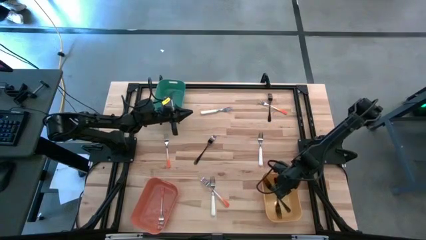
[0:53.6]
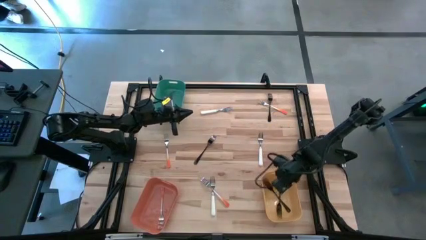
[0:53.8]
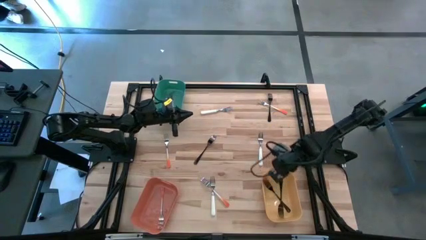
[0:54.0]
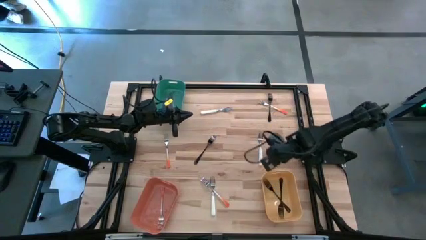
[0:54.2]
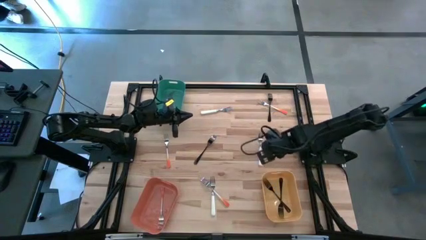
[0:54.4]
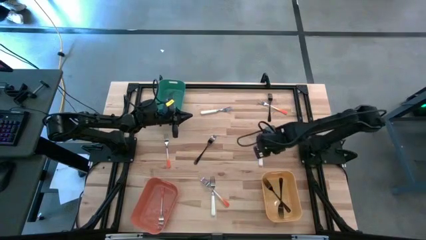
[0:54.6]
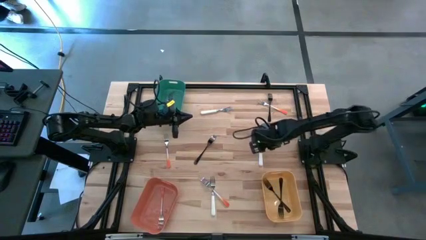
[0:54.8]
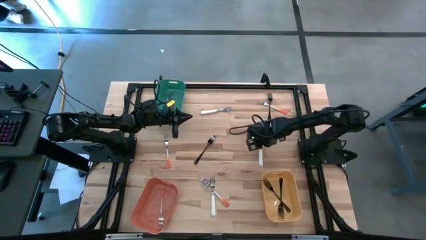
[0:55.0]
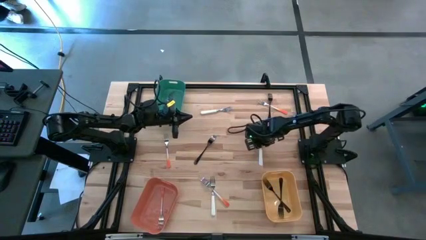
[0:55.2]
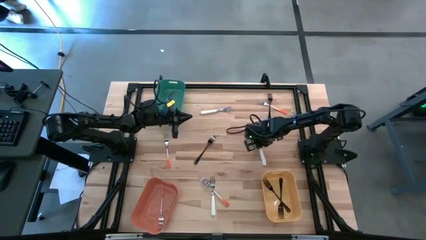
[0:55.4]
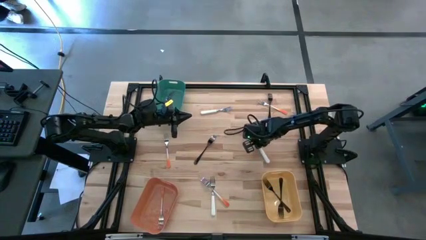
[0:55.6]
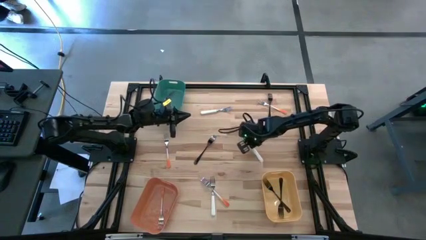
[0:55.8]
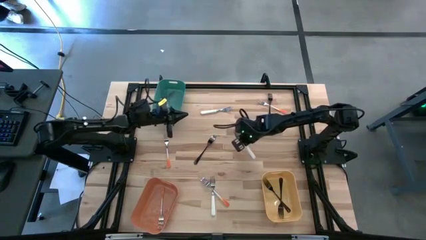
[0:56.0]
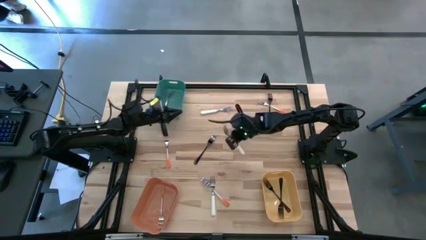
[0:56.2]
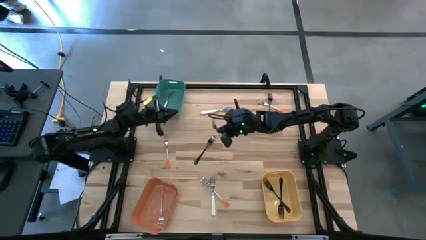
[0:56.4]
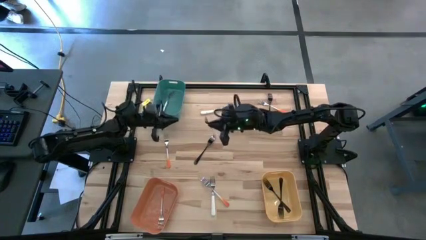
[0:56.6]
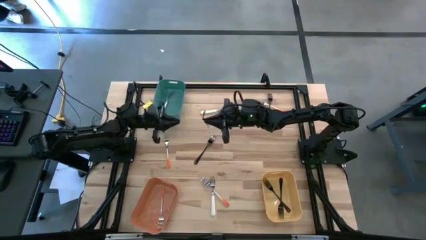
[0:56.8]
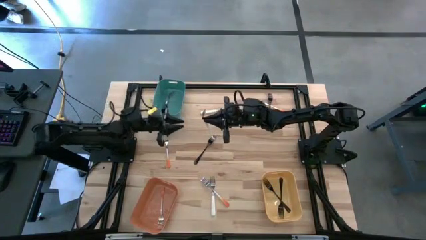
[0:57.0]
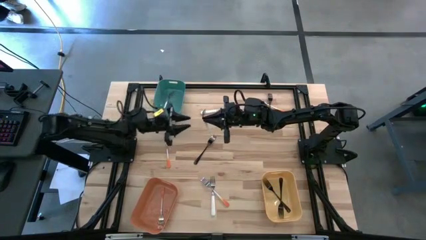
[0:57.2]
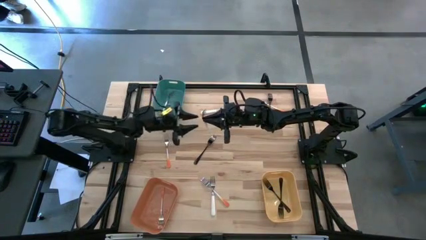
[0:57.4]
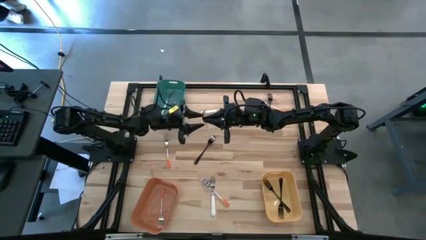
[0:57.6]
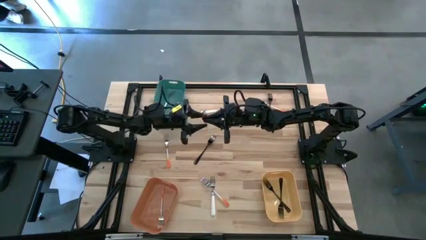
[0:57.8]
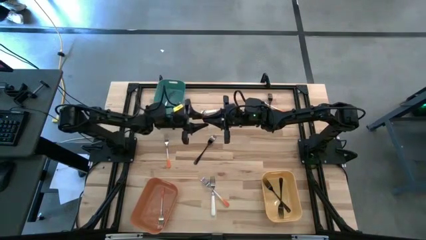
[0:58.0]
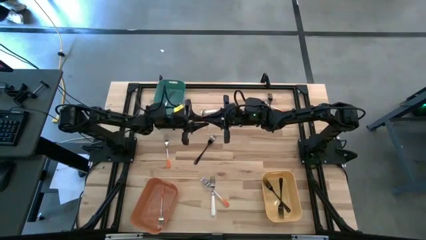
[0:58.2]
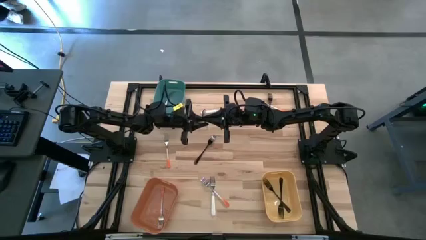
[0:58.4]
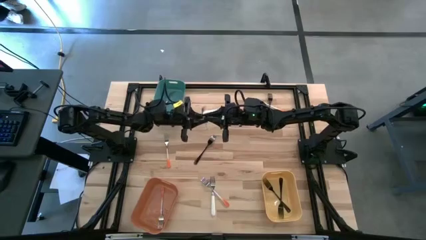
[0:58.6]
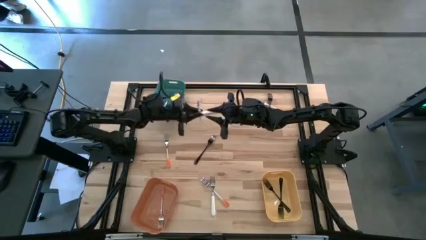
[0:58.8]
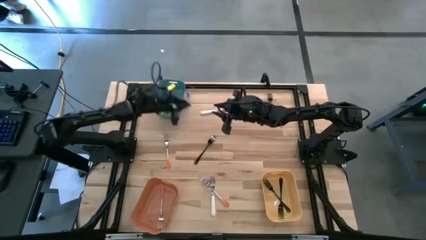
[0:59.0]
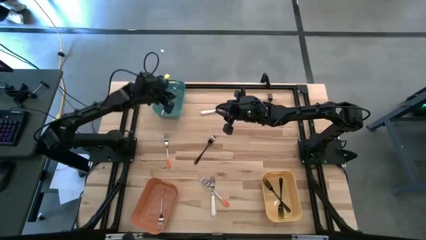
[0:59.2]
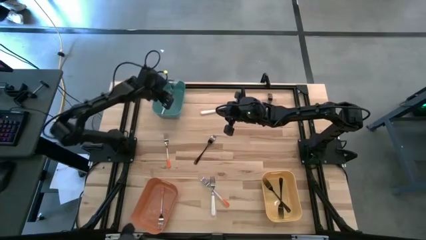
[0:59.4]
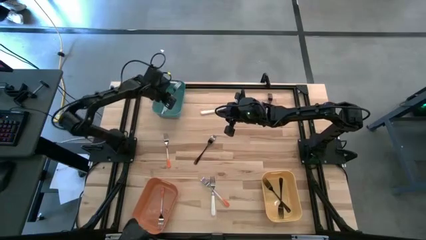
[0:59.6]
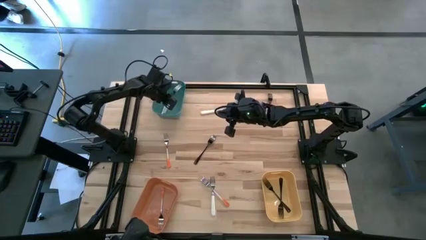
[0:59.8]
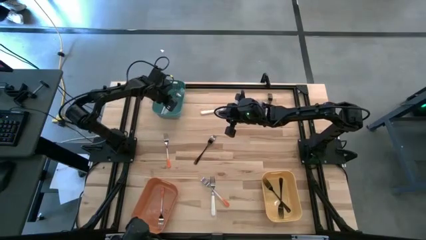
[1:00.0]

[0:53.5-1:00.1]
Task: Sort silverware by color (type)
Put the white fork into the green bin

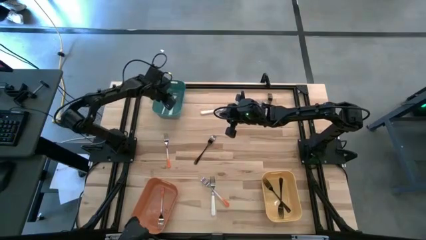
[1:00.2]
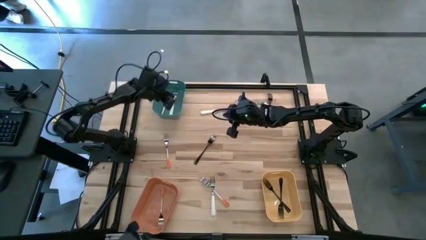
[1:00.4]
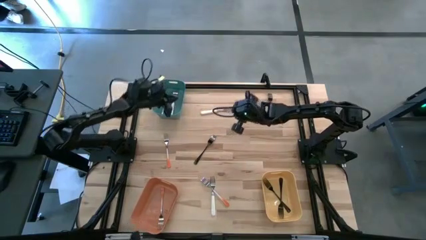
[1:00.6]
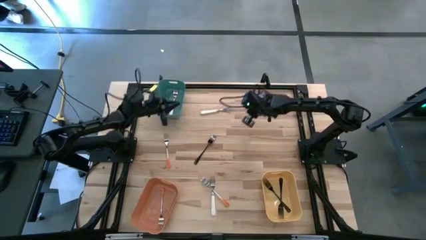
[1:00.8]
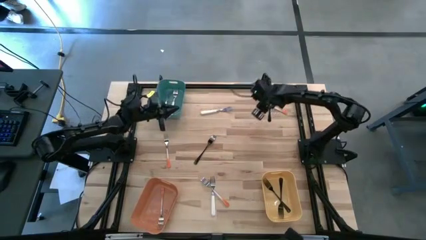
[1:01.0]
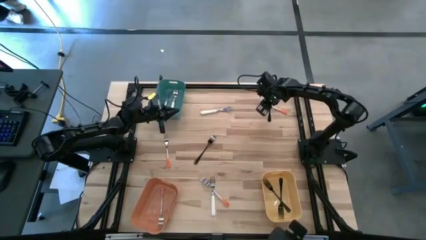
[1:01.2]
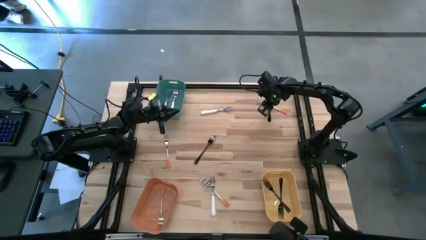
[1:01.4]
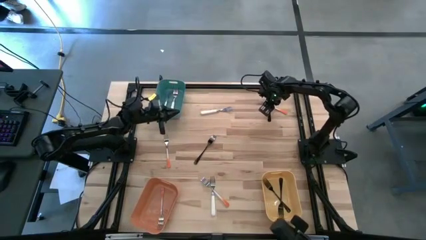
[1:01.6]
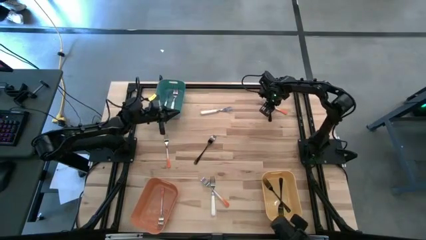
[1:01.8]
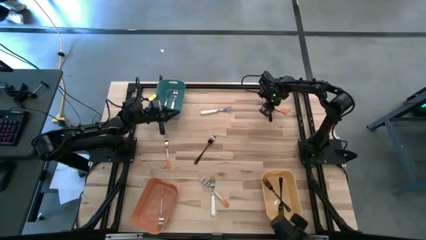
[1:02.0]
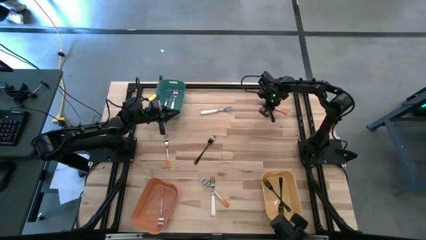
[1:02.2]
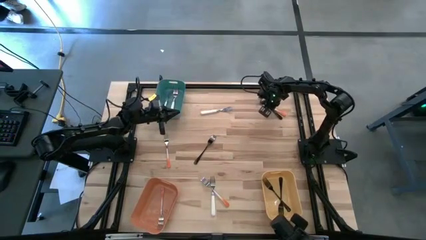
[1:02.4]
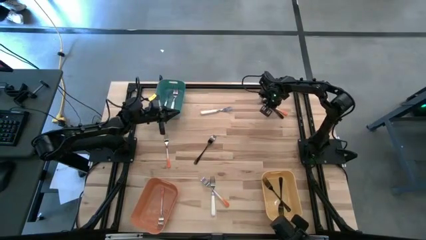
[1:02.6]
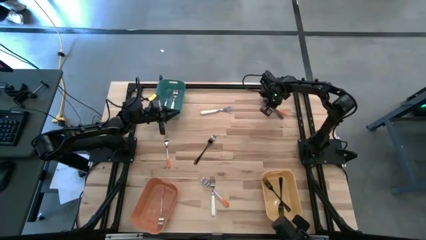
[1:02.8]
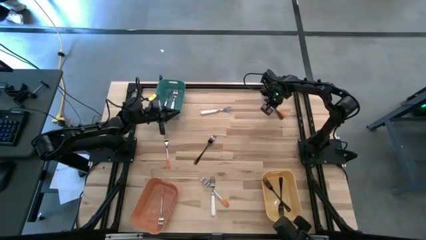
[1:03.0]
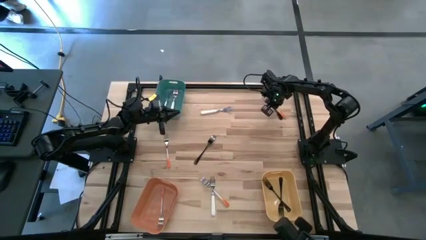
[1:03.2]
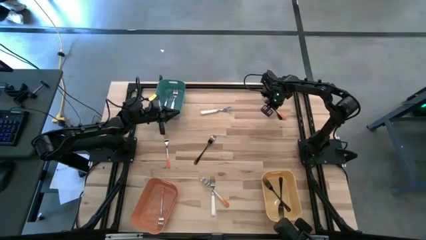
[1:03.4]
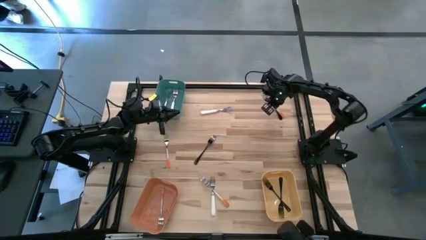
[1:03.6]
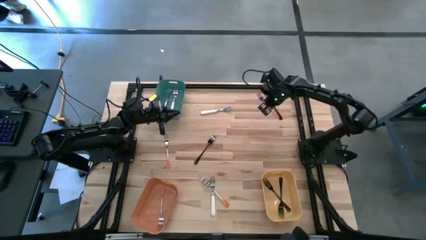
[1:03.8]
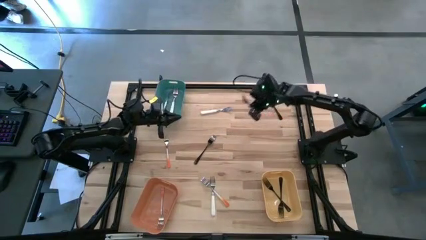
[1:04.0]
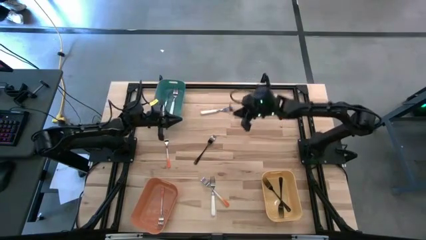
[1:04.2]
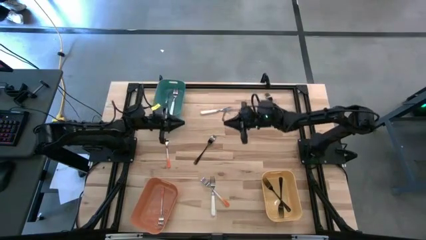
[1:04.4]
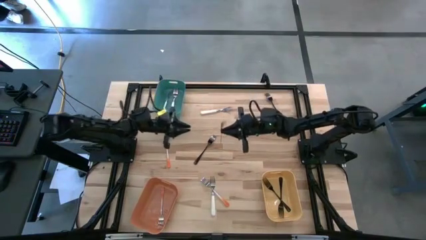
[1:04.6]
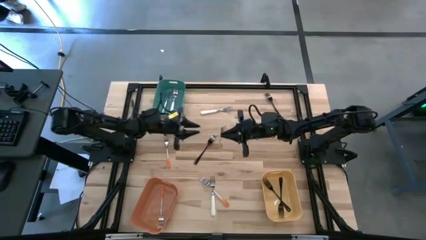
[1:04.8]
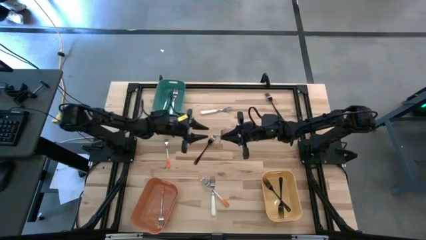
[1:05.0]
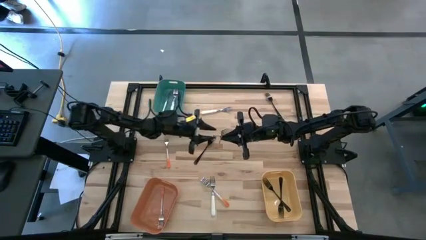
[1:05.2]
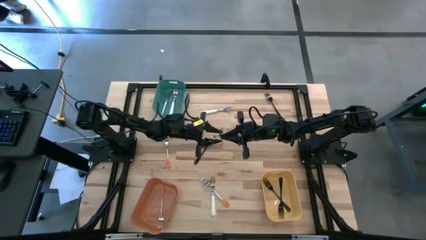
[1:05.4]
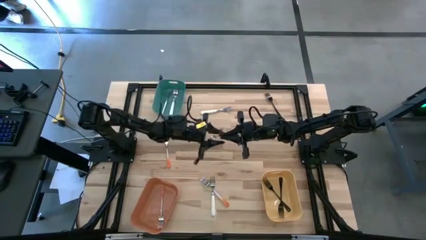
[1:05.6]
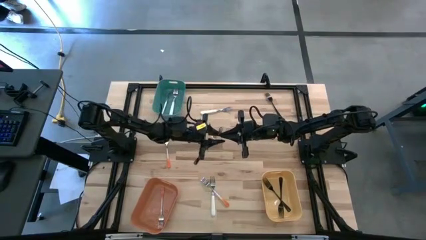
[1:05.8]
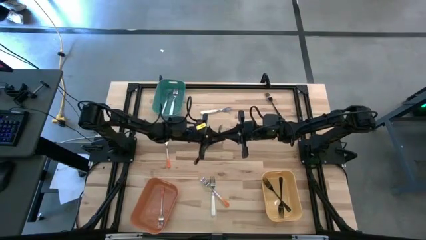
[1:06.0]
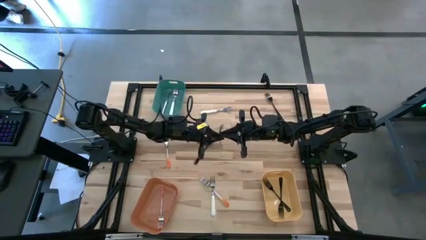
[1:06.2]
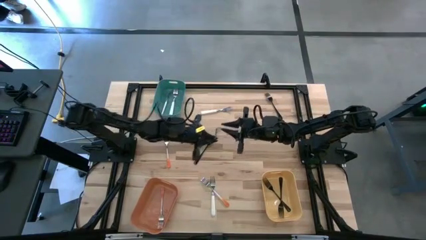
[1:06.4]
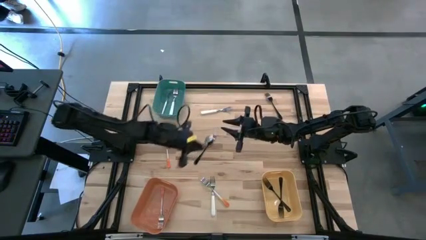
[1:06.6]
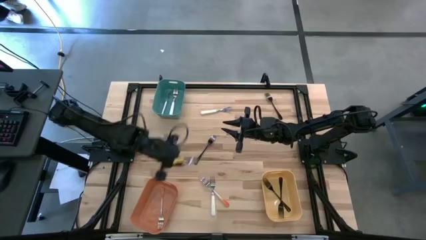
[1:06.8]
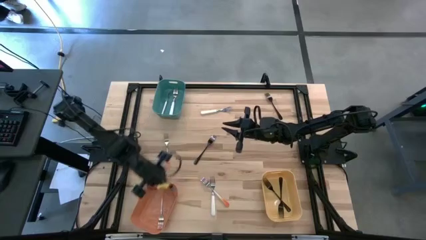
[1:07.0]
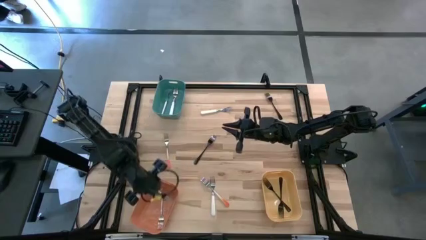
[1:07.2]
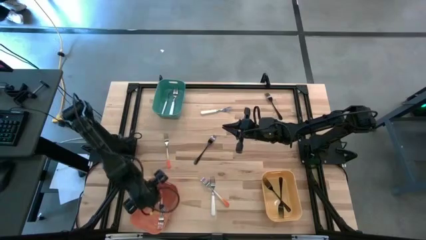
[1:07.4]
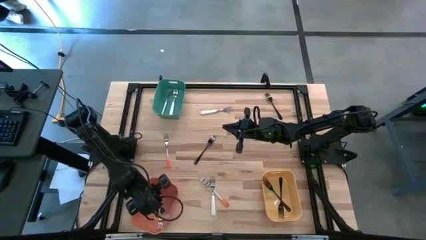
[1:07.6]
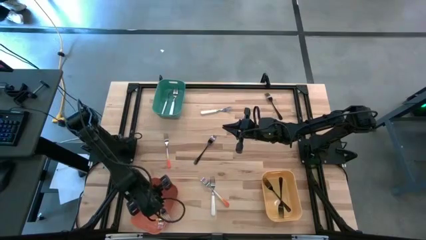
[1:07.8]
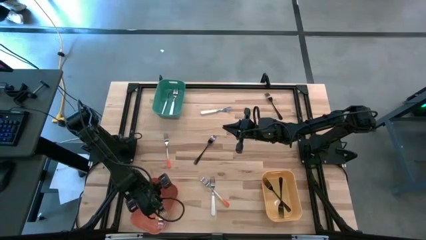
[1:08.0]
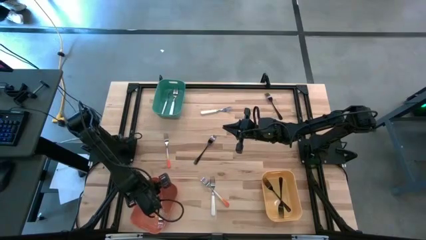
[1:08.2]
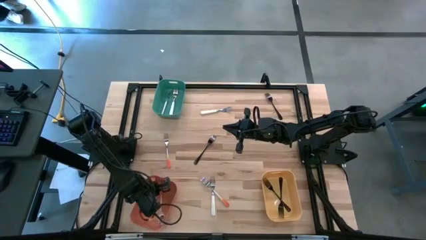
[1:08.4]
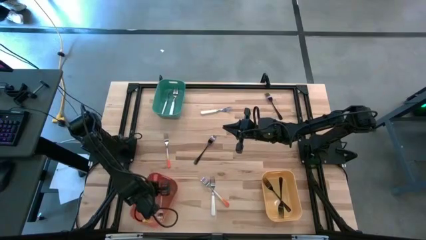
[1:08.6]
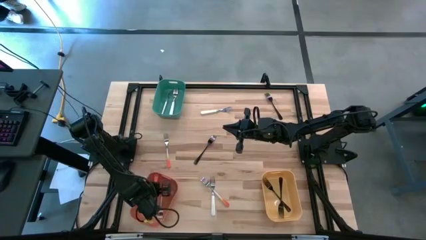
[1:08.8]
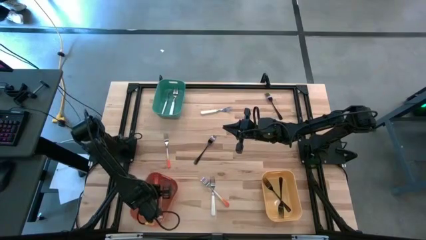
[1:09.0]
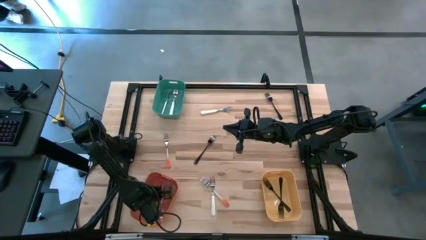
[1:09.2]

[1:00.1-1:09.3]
Put the orange fork into the orange bin
